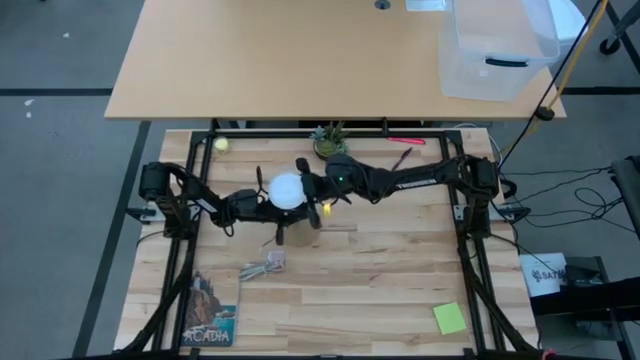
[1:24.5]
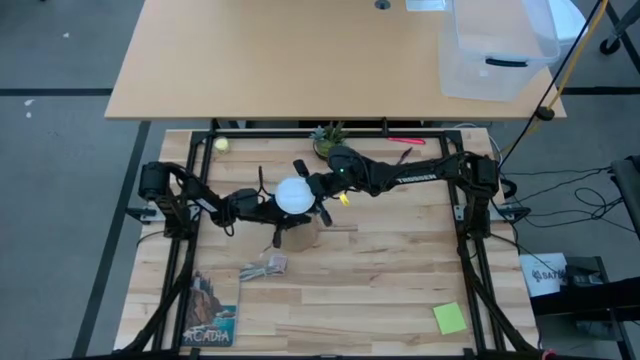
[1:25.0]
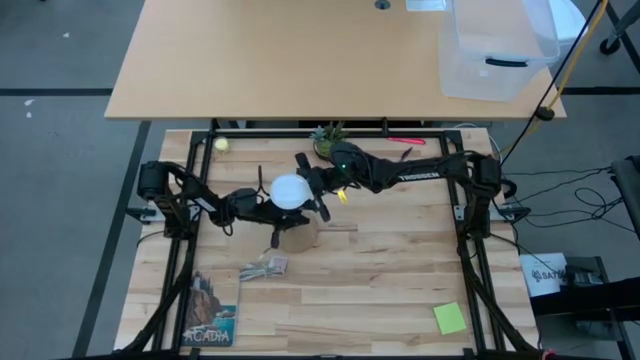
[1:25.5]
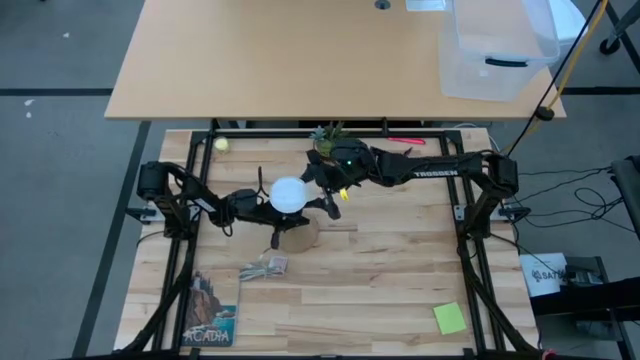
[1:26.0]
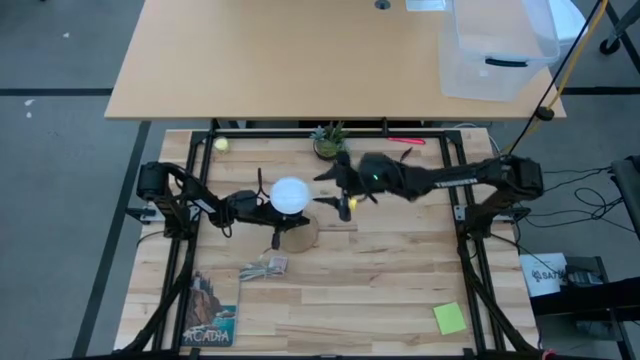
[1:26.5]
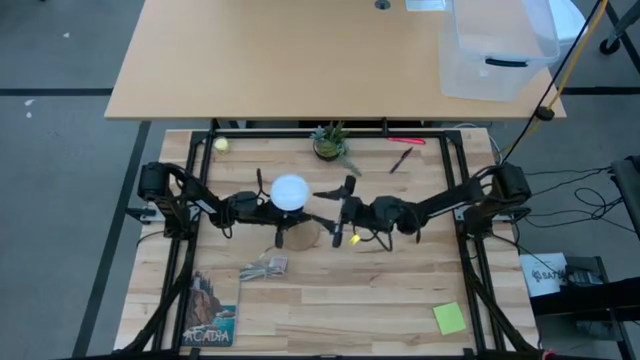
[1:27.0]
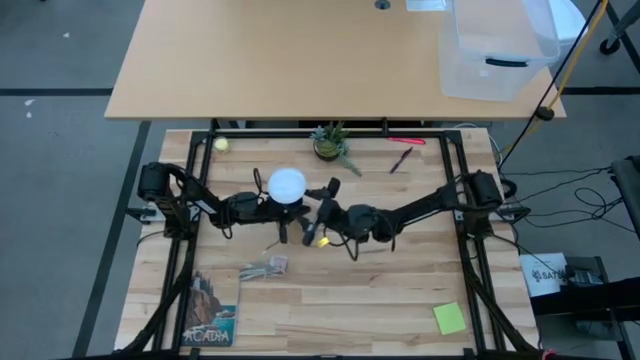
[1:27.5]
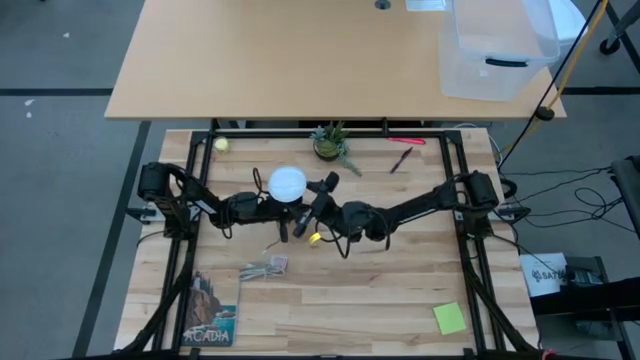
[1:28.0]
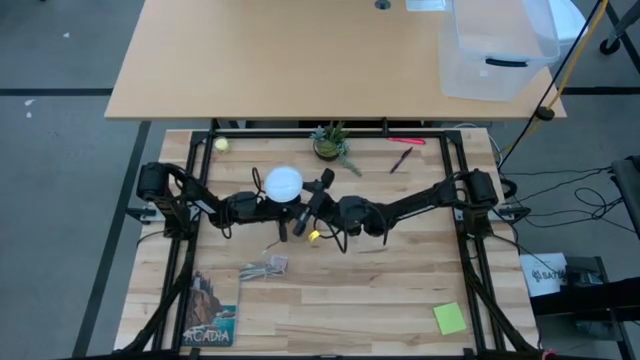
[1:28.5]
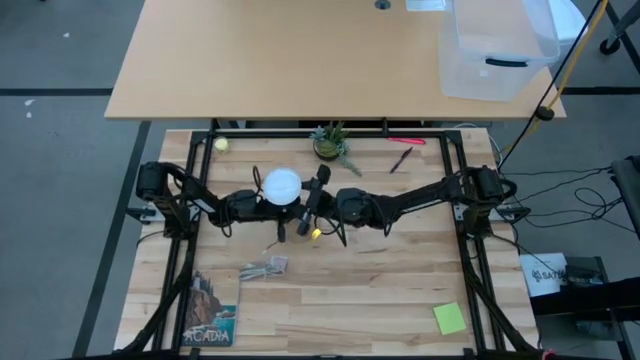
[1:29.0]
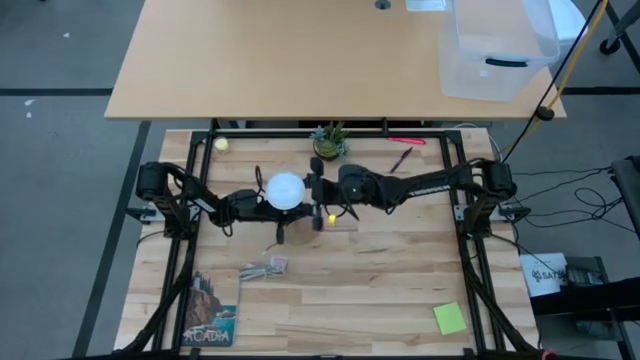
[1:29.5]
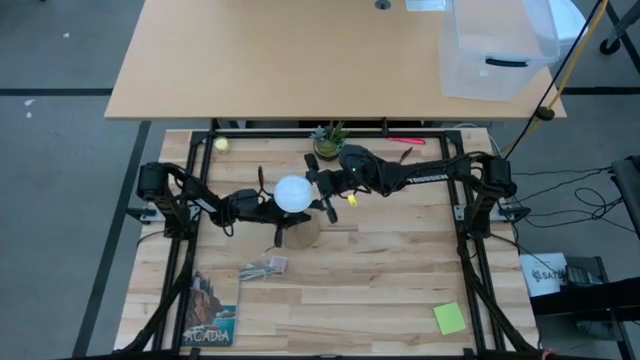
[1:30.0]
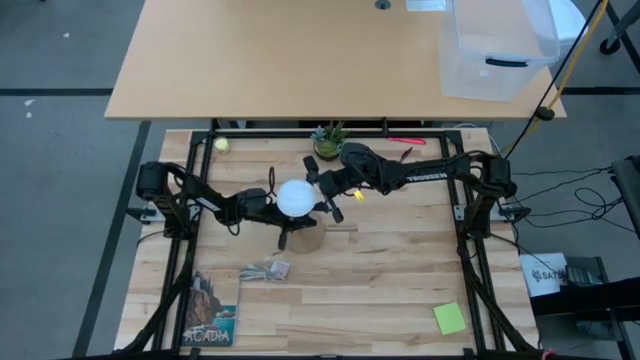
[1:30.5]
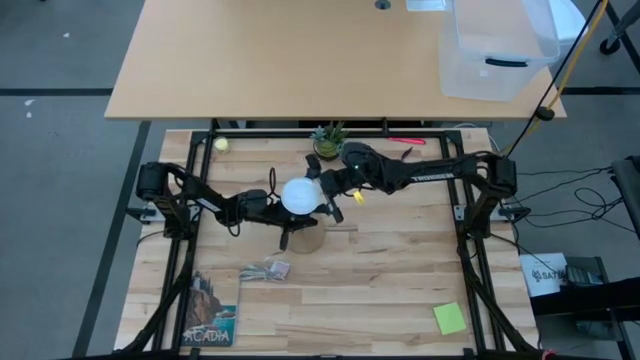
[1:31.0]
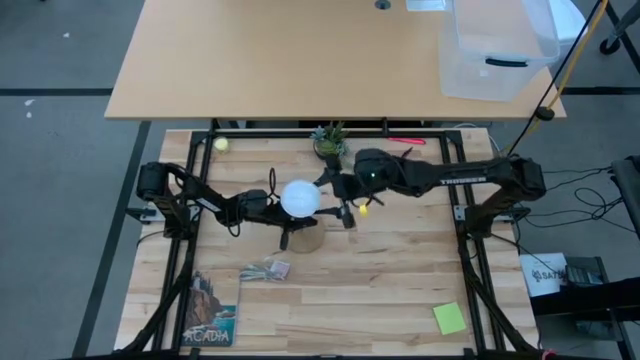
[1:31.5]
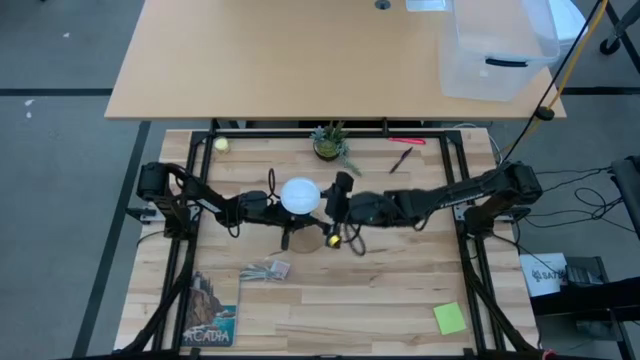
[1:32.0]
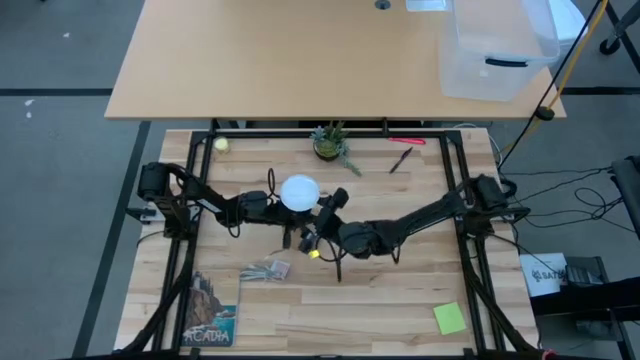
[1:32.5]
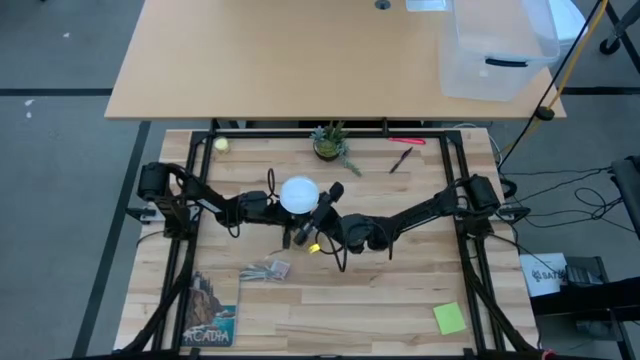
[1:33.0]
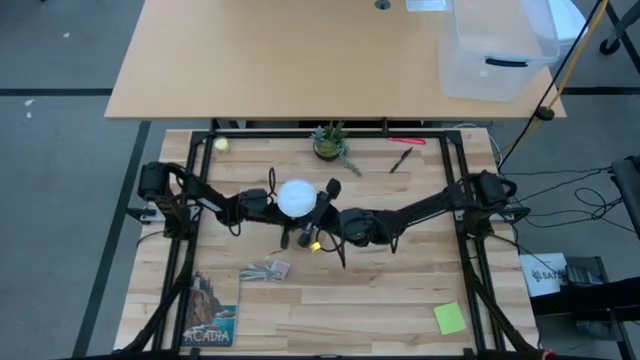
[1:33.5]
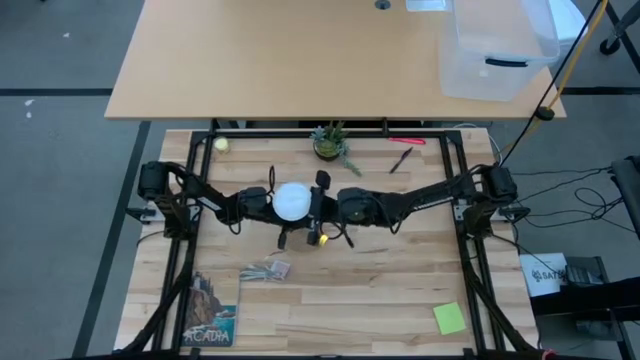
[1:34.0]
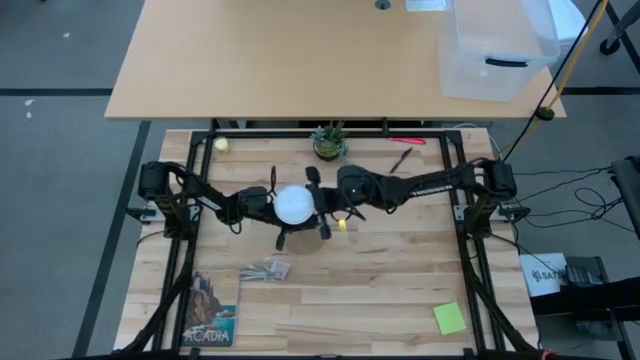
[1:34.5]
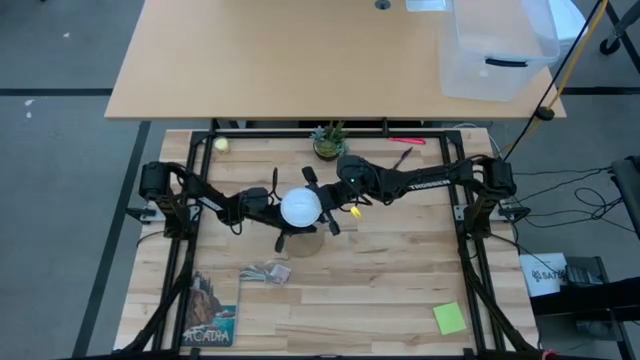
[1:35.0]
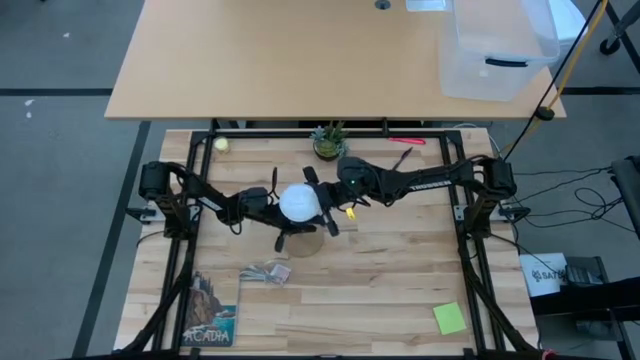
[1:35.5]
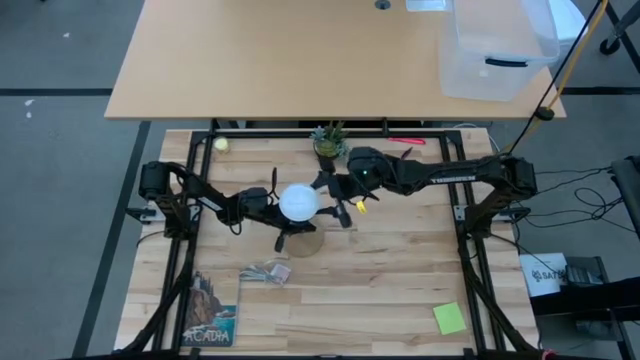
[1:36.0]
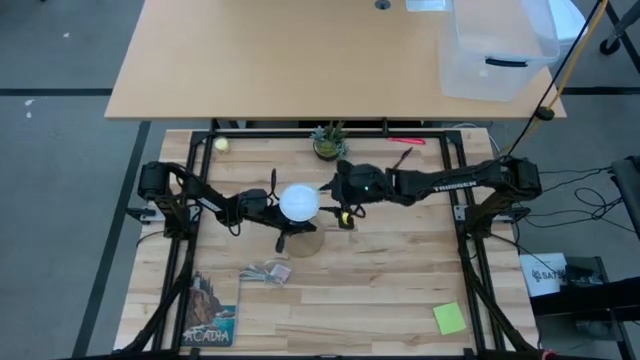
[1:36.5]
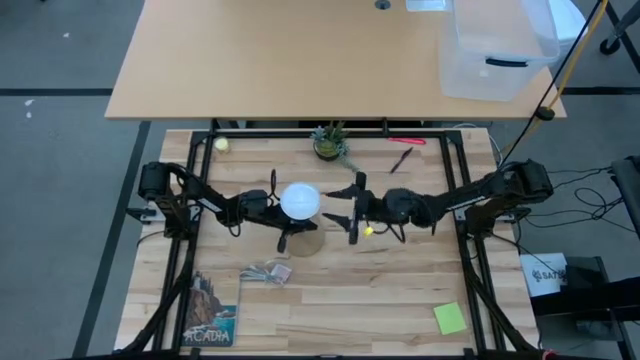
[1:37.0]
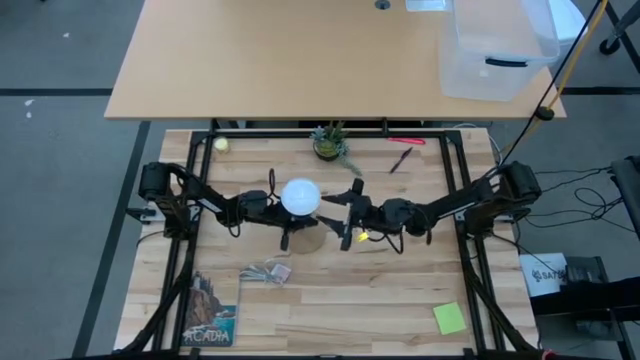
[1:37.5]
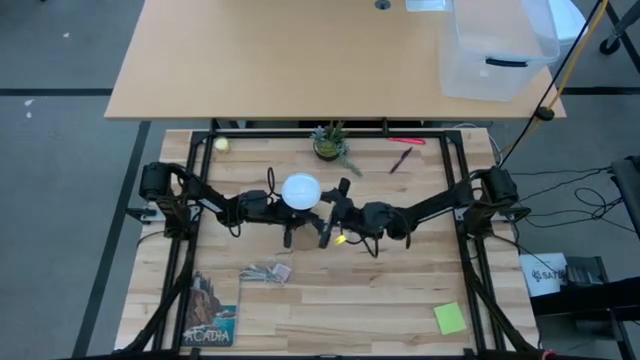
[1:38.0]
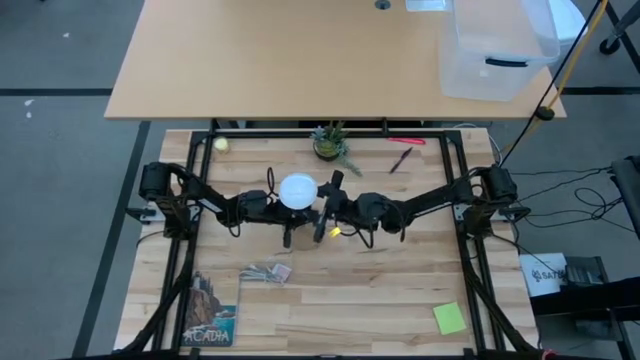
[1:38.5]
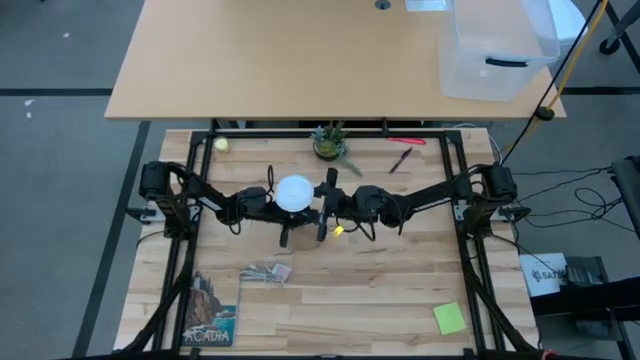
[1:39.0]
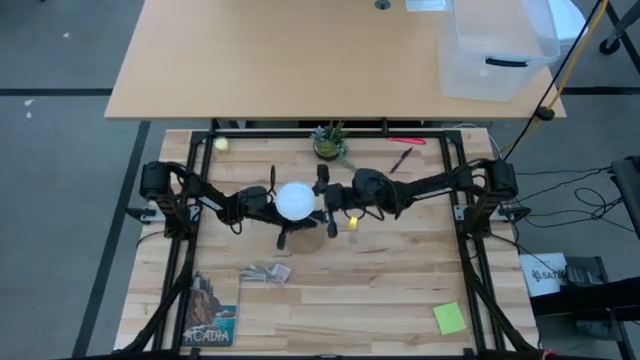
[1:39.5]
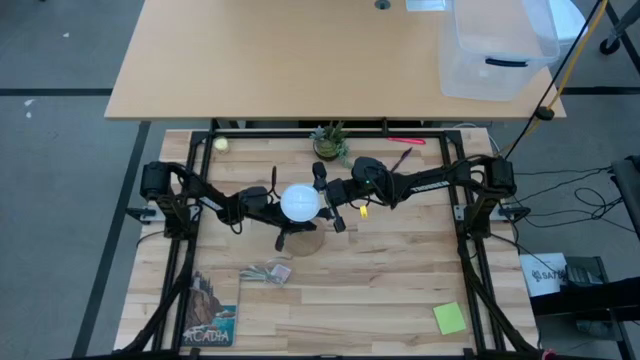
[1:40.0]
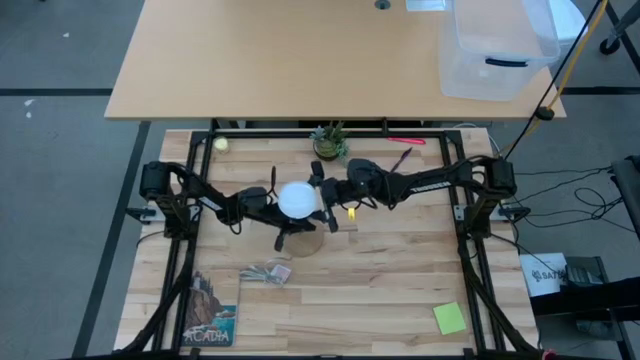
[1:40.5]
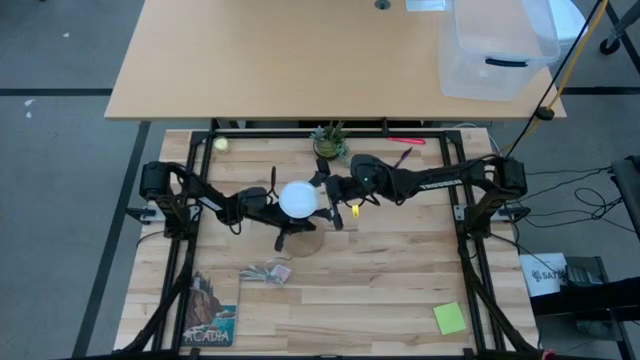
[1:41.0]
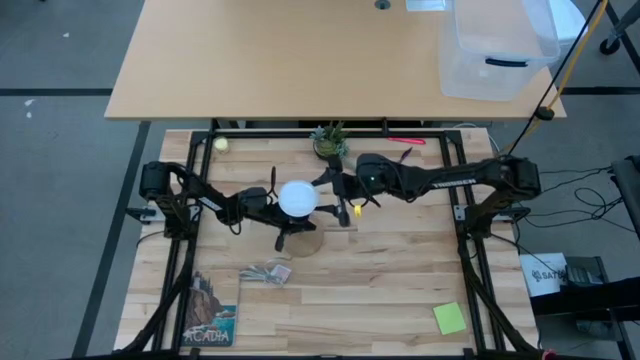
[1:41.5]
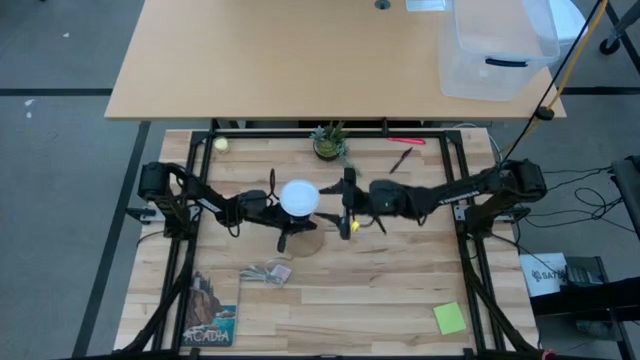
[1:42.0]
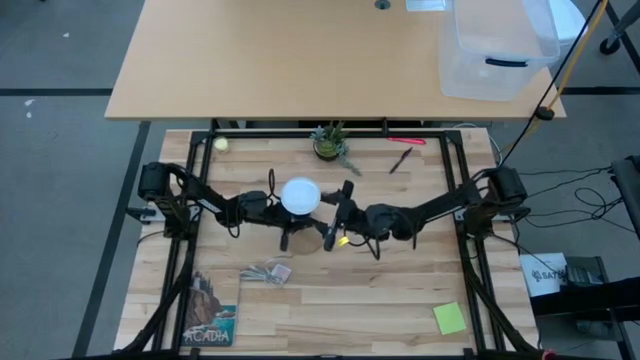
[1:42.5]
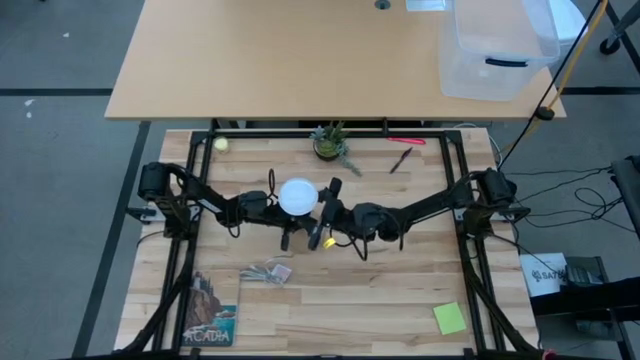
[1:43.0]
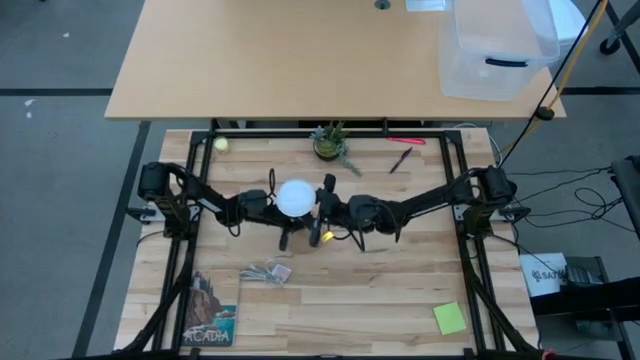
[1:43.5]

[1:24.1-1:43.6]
Task: Screw lightbulb
Remove the lightbulb from the lamp

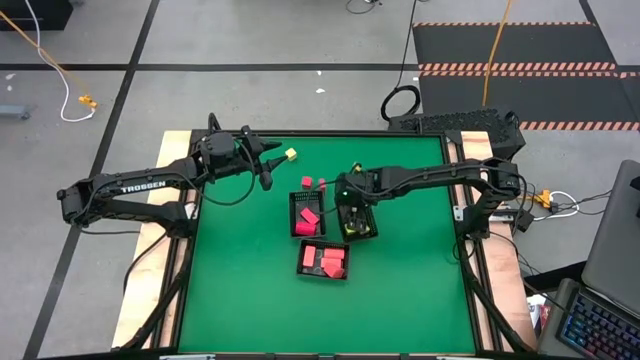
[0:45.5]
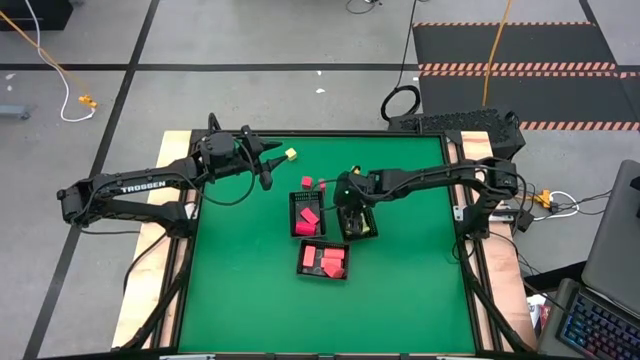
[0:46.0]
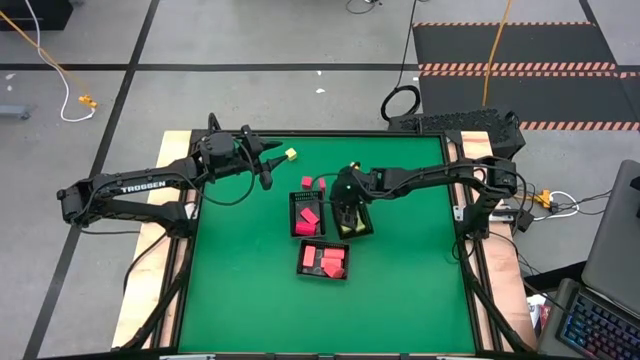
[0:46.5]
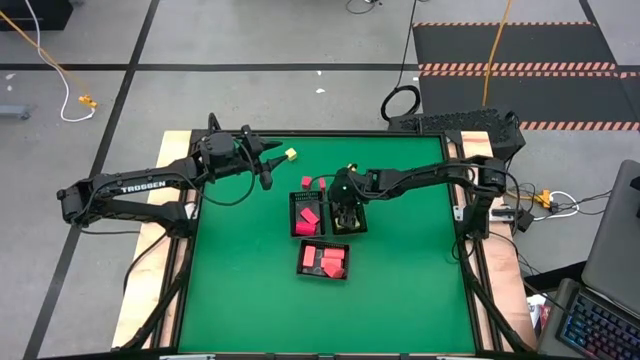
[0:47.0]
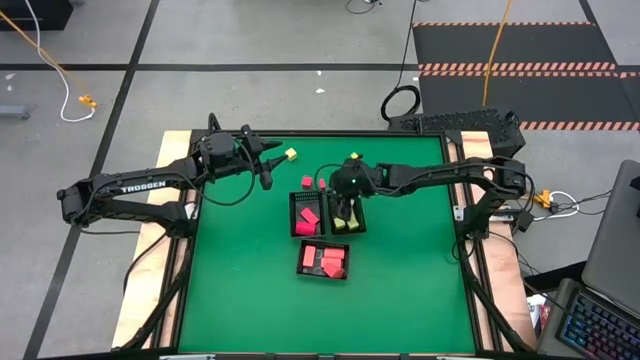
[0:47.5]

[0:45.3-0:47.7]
Task: Sort & place blocks by color
Adjust the right black bin
